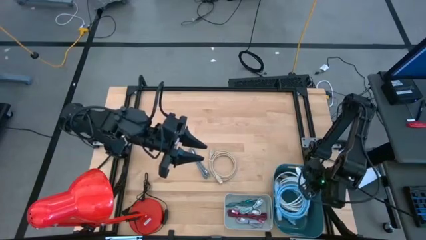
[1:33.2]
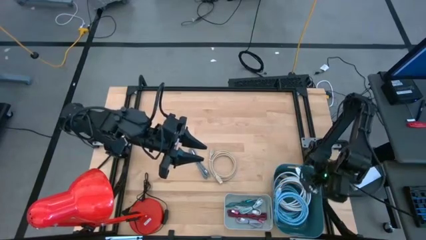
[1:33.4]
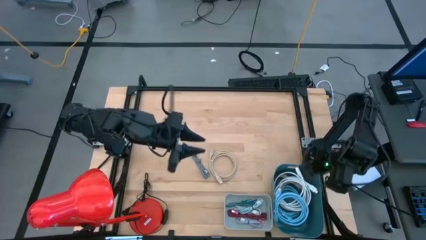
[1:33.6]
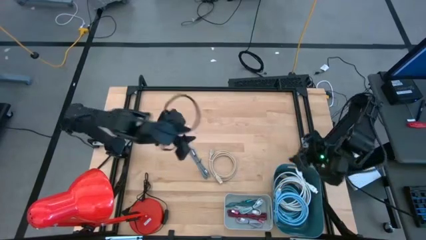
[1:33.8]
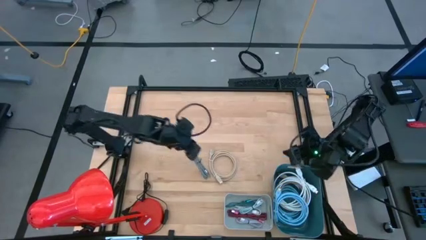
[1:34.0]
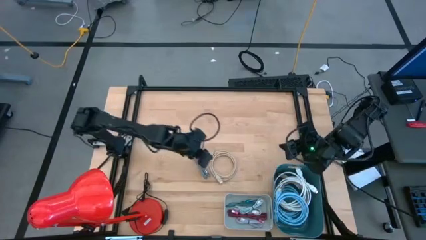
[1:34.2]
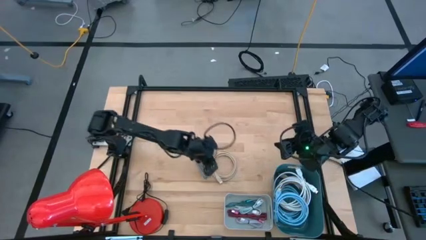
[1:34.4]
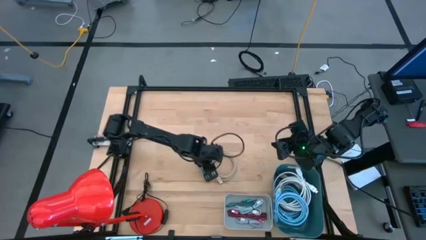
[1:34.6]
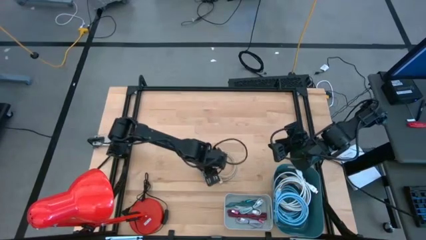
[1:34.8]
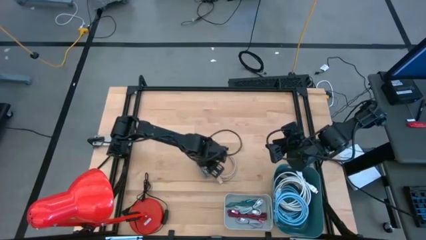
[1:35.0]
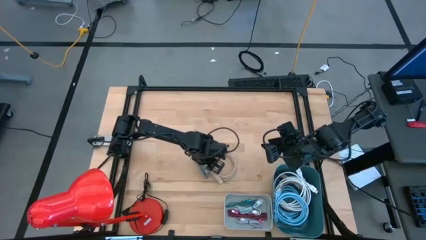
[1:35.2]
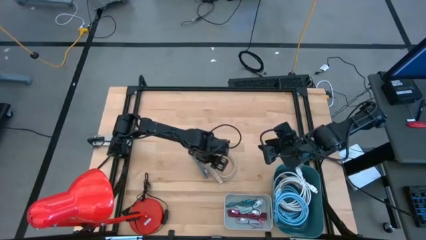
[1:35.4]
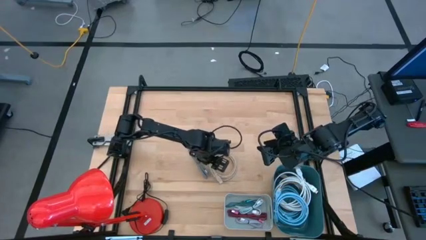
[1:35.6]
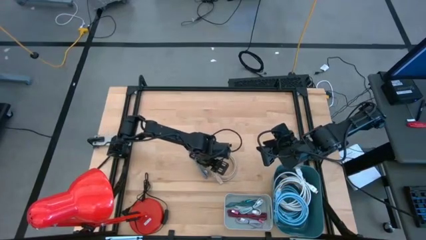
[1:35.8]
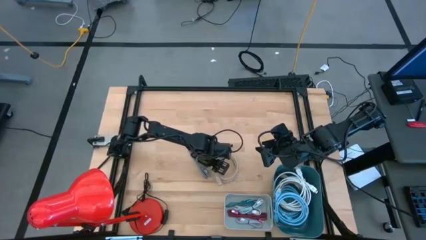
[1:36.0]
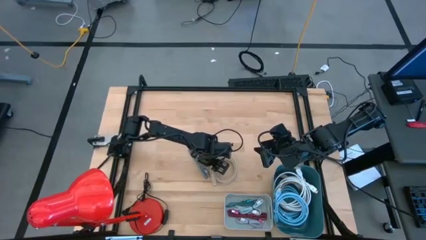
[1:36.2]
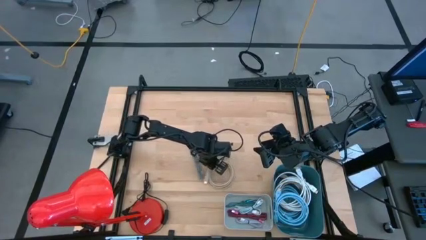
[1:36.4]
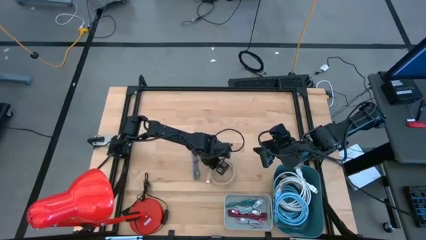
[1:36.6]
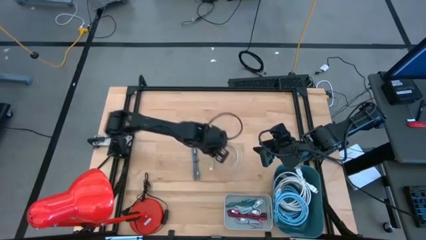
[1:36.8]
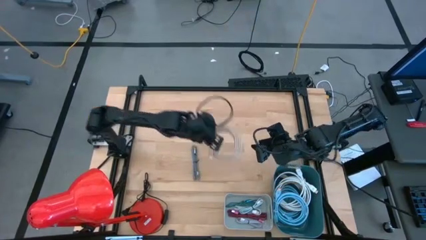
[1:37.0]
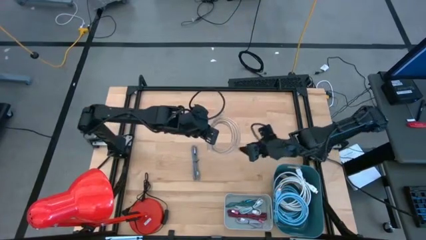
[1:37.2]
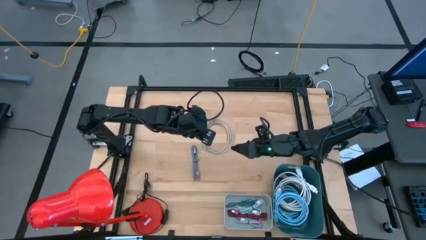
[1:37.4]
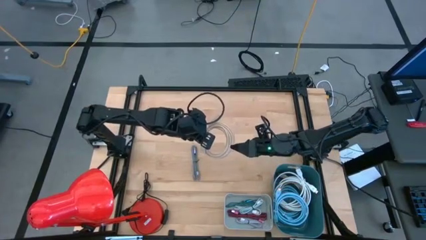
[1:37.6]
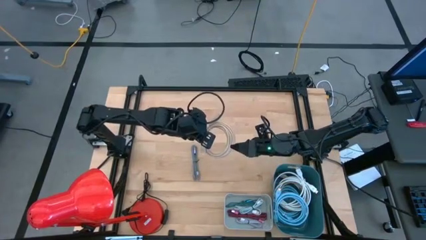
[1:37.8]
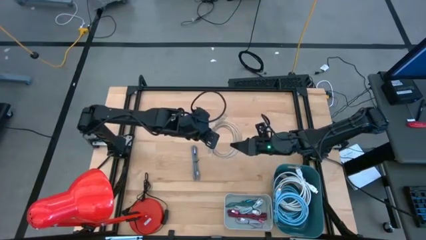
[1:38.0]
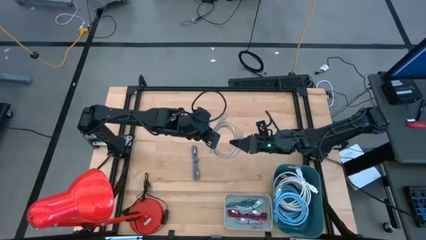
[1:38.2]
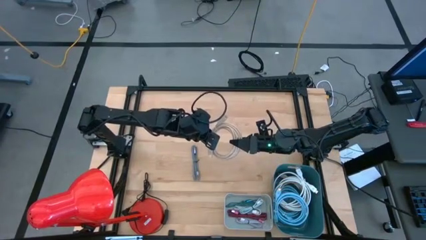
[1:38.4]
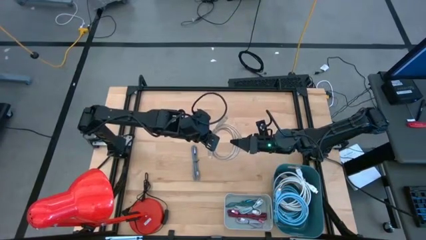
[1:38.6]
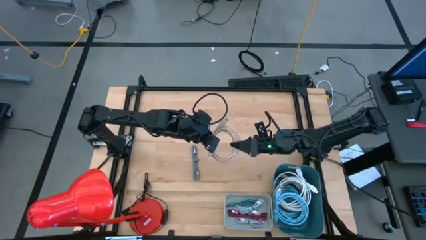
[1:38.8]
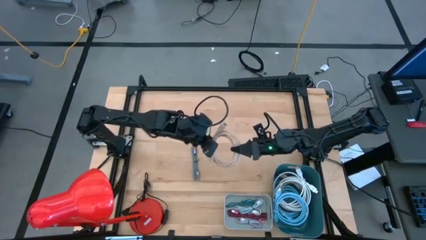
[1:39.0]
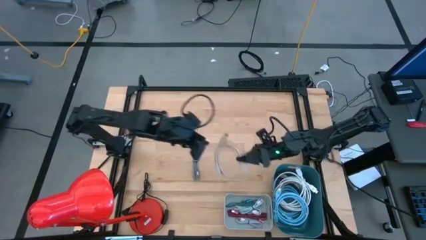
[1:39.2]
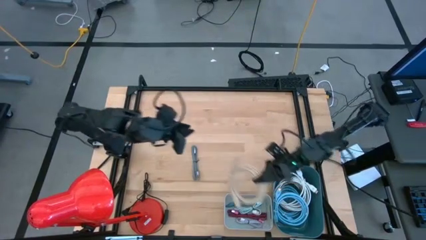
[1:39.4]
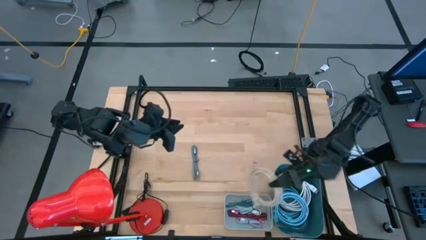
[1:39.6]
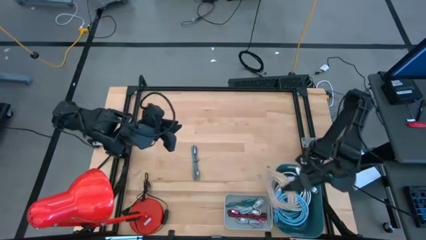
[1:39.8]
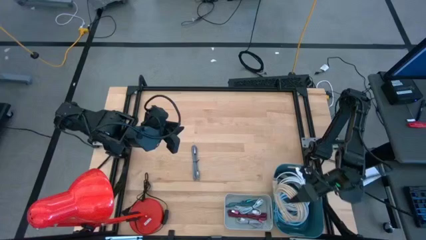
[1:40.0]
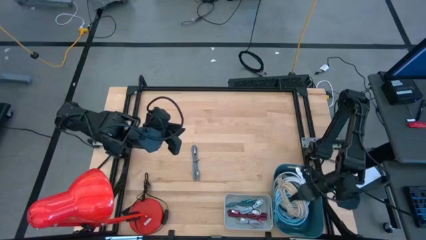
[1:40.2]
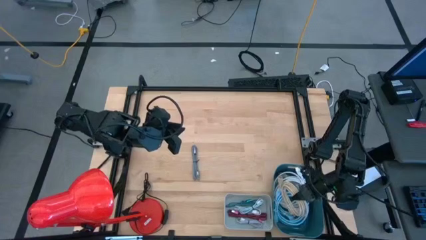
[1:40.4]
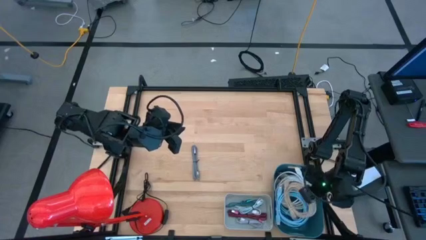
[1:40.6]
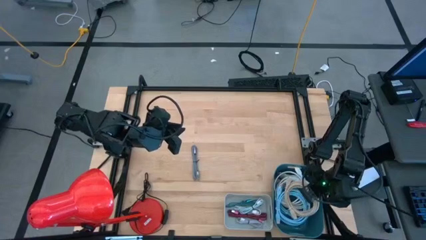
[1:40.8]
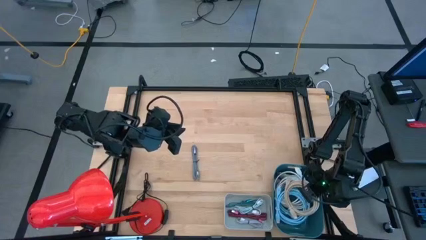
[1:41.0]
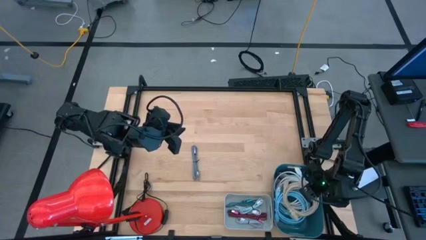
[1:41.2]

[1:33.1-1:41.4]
Task: Pick & Place USB Port
Put the brown HDMI cable into the blue bin

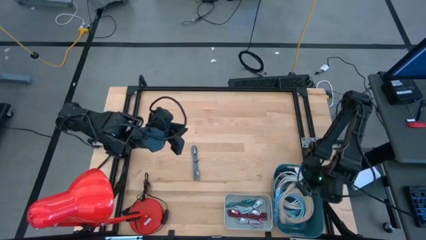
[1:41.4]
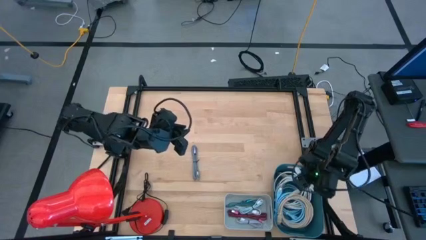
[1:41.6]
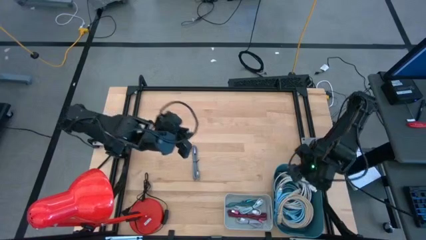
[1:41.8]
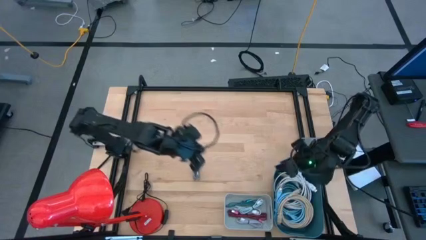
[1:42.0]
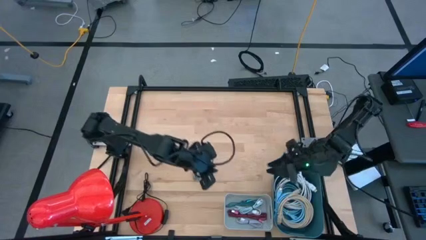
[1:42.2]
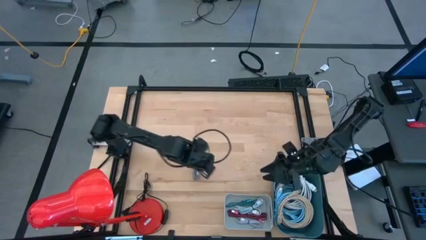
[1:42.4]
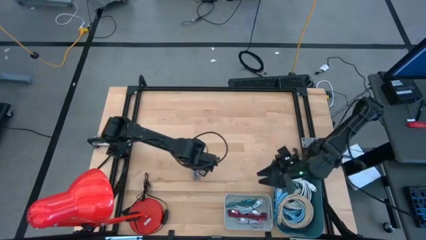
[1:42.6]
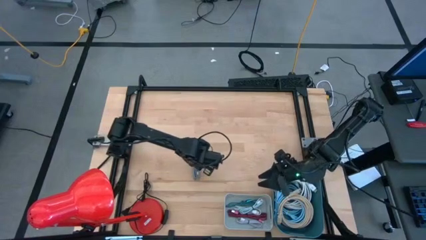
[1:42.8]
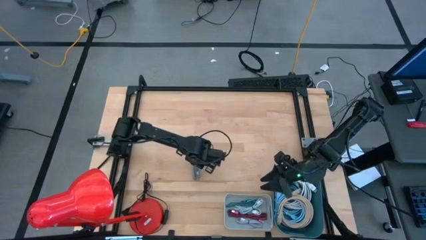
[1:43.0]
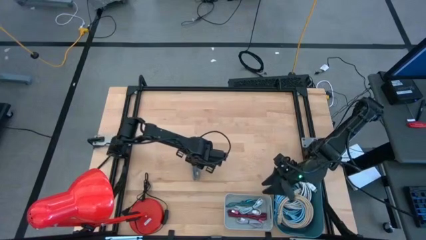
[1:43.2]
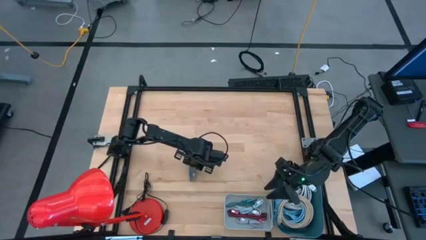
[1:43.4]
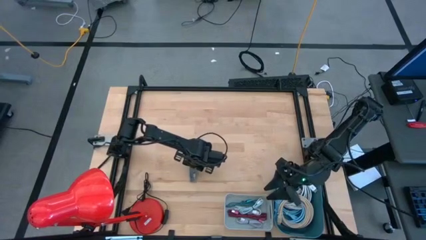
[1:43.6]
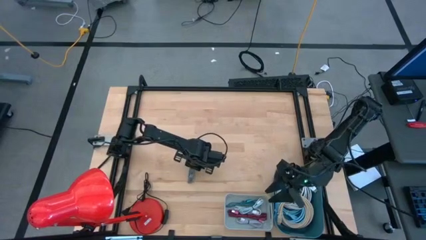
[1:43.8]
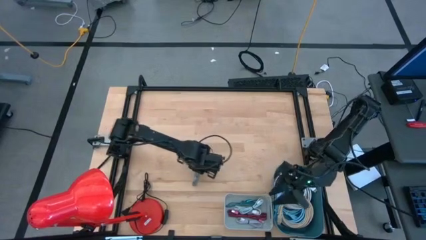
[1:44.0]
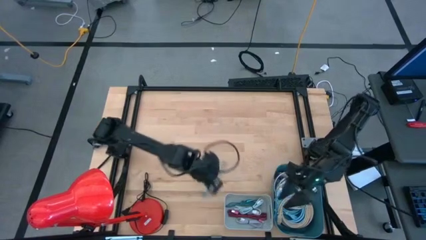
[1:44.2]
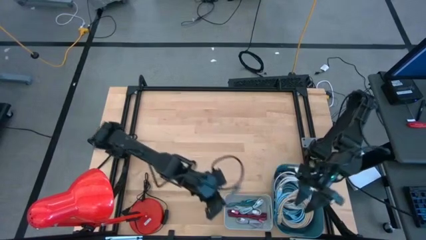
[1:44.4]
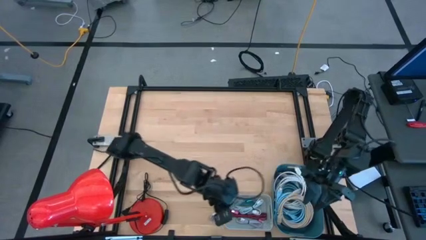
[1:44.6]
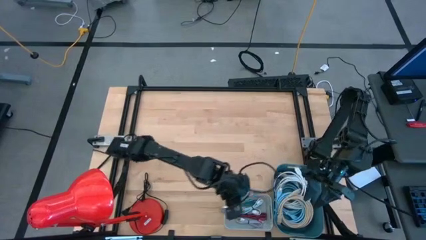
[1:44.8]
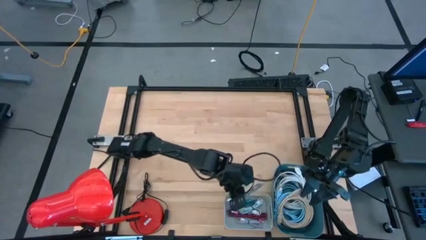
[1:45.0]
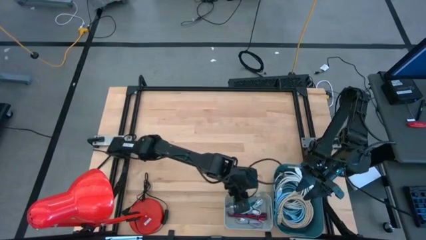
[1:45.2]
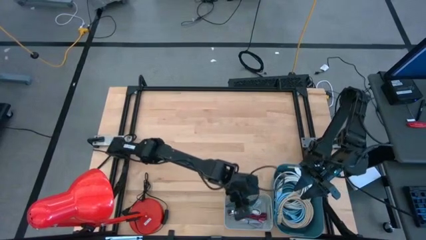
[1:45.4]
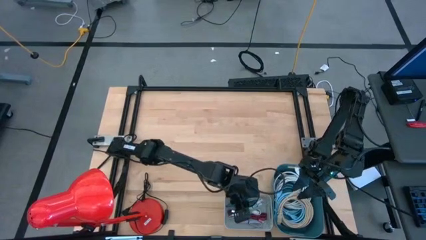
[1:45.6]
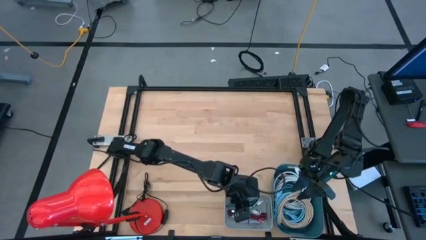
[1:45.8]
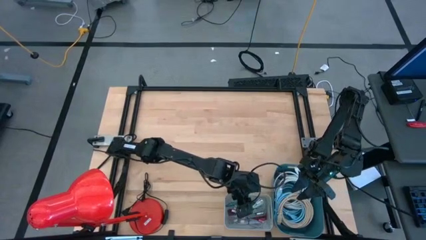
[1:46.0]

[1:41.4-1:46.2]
Put the white and black USB cable into the gray bin

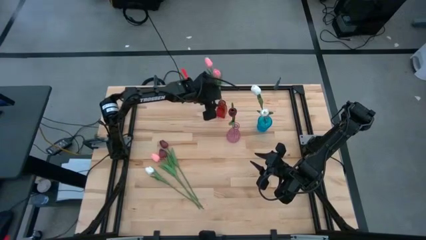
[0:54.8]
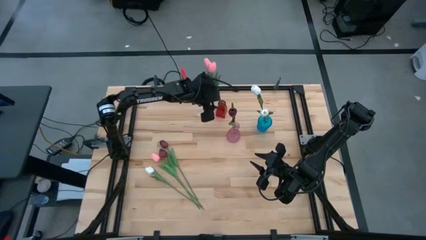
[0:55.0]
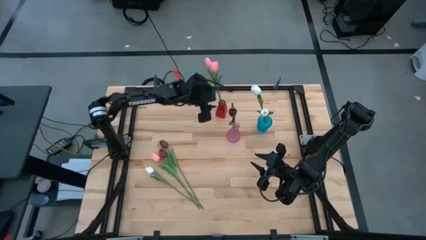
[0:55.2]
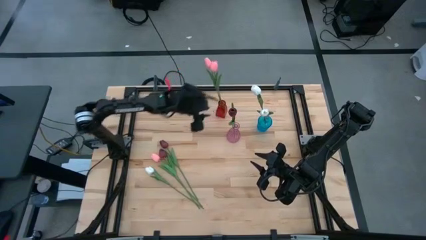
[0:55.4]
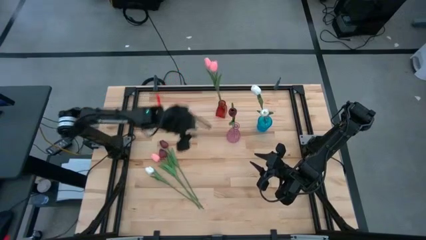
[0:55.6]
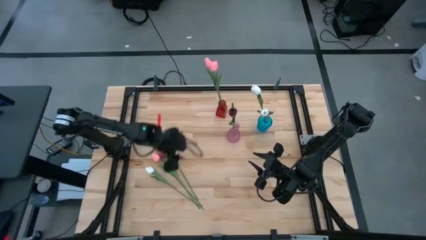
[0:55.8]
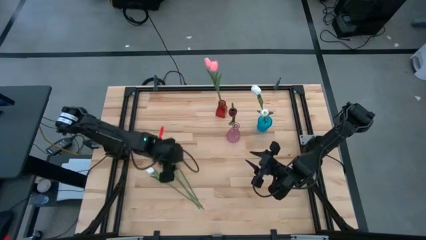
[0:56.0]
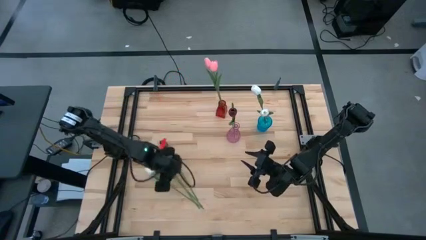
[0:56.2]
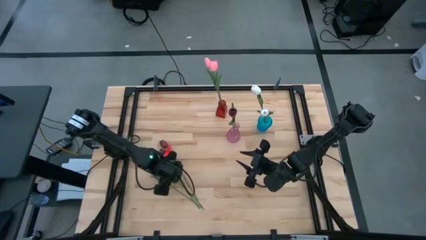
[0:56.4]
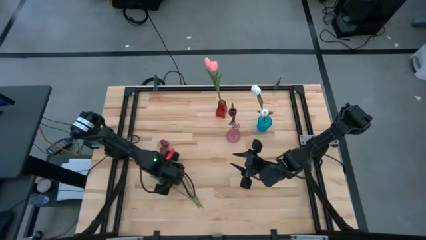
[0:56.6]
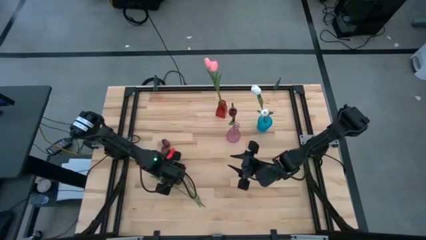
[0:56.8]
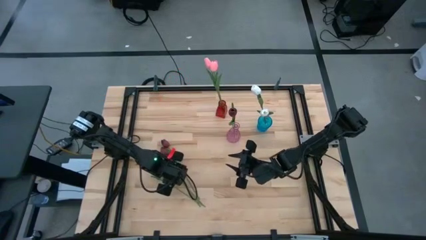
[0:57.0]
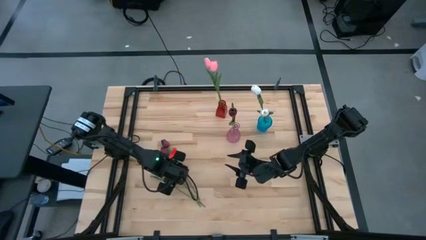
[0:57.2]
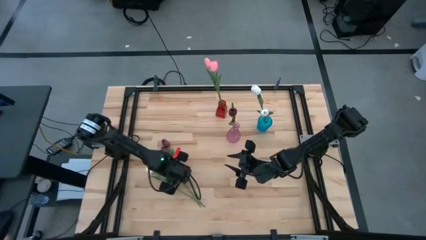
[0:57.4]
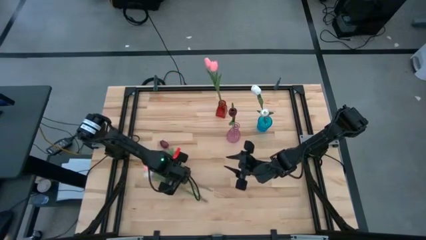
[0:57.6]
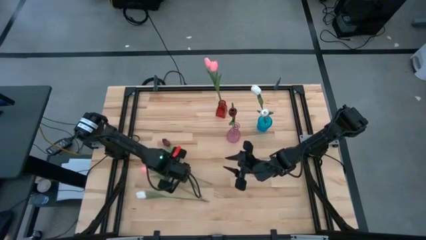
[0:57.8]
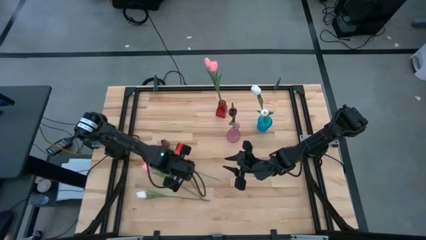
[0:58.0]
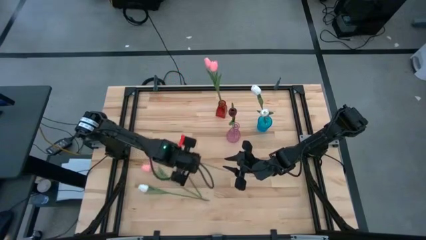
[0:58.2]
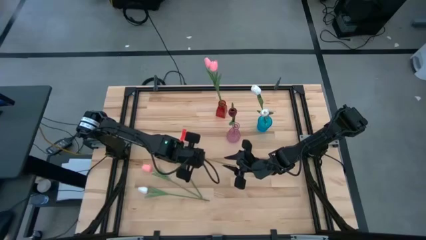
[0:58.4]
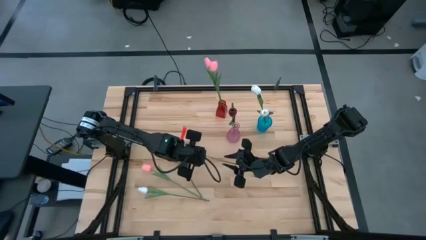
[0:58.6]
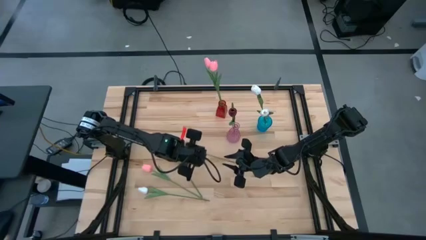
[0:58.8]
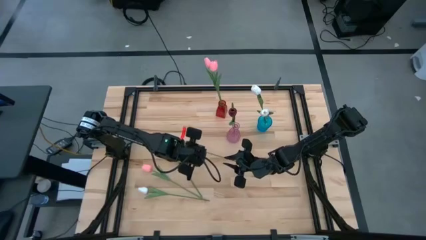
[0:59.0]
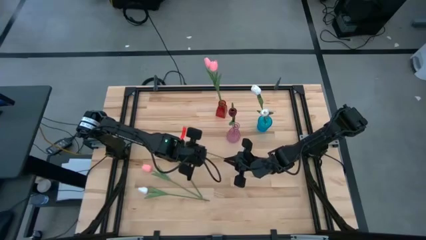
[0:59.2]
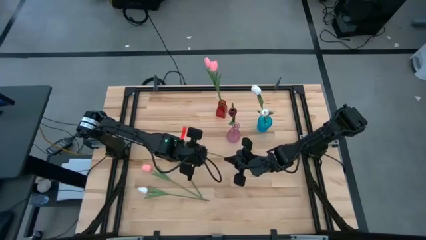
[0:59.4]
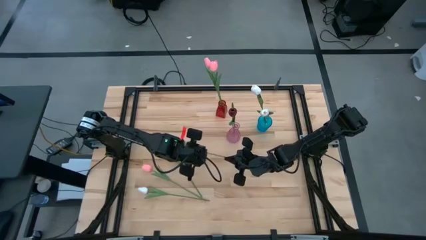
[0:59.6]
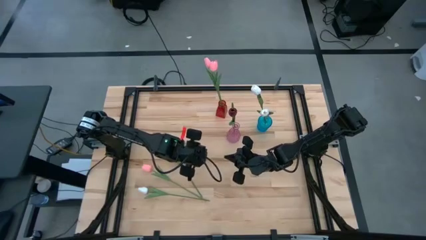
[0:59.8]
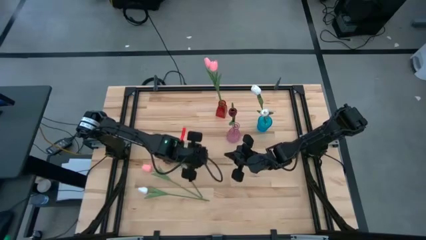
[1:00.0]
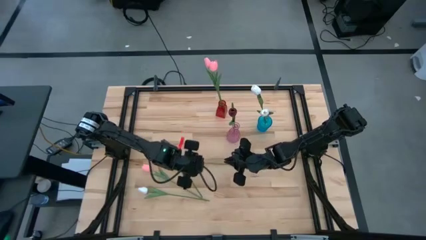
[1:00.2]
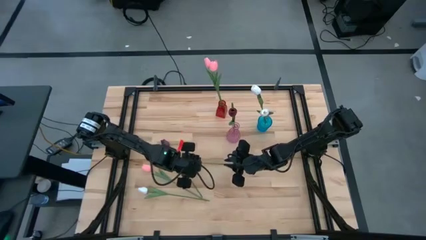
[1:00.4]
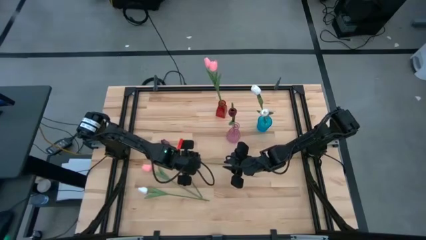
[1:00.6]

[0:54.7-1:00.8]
Task: Sort flowers into vase by color
Put the bottom red flower into the pink vase
